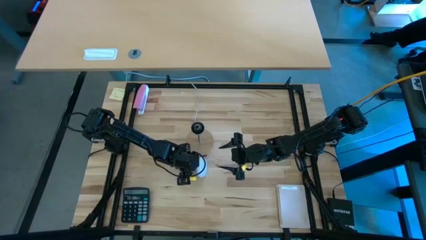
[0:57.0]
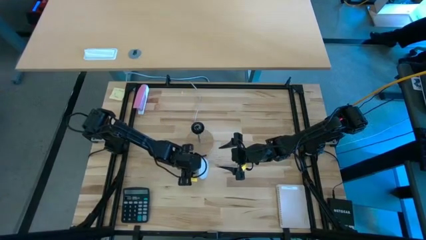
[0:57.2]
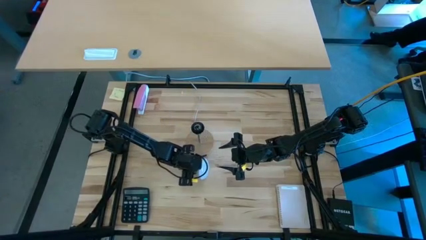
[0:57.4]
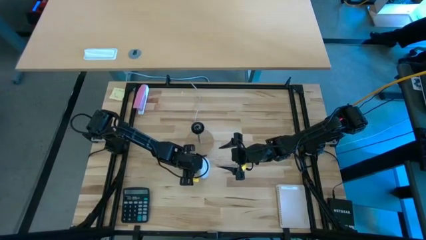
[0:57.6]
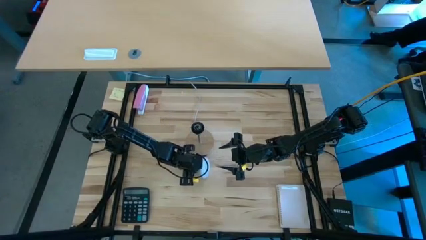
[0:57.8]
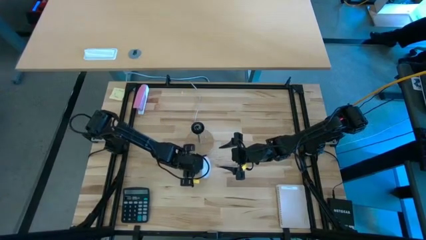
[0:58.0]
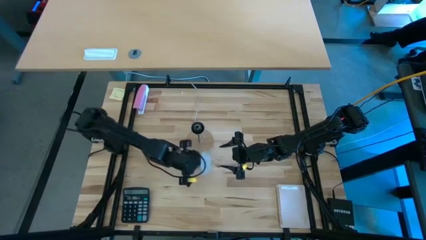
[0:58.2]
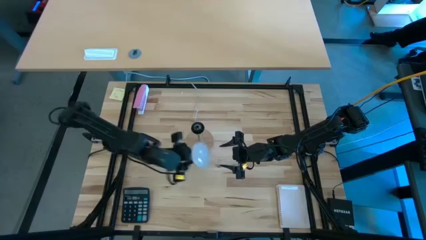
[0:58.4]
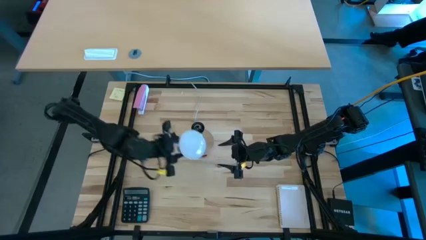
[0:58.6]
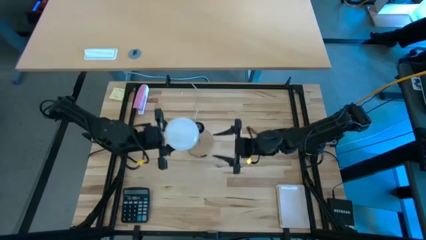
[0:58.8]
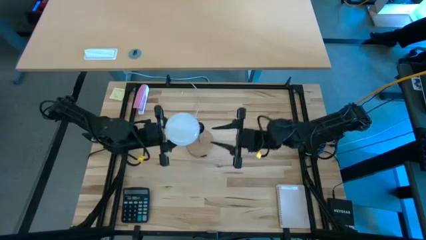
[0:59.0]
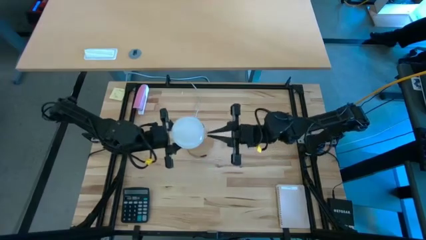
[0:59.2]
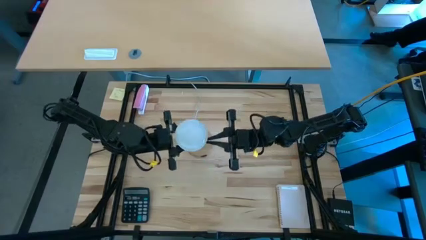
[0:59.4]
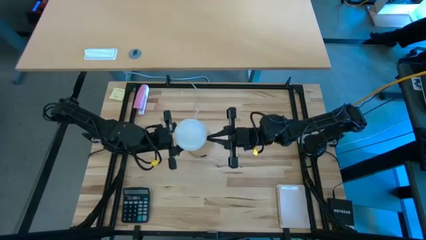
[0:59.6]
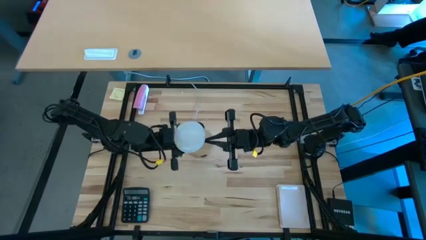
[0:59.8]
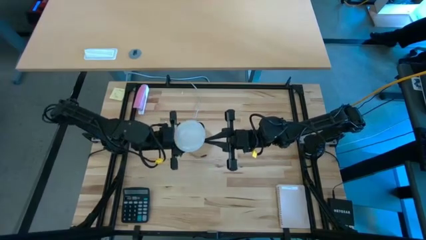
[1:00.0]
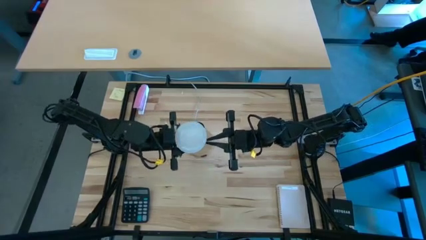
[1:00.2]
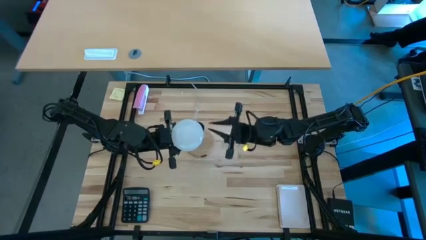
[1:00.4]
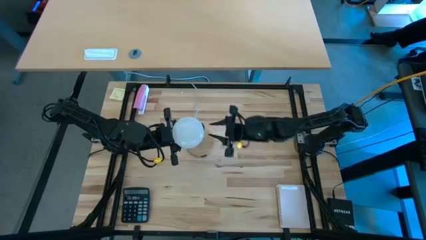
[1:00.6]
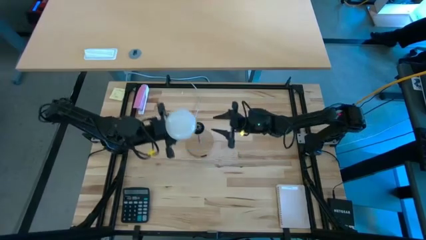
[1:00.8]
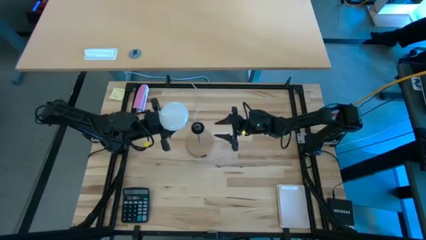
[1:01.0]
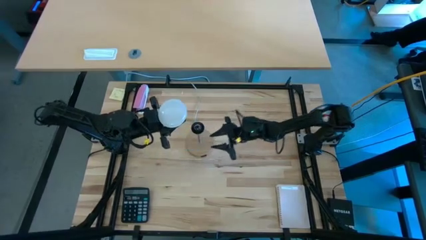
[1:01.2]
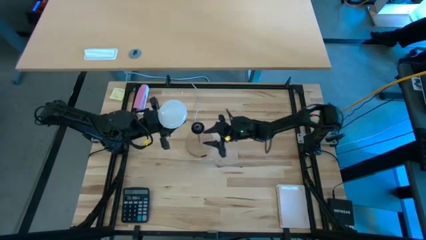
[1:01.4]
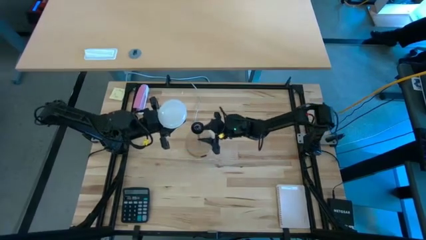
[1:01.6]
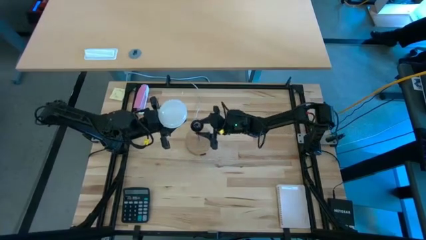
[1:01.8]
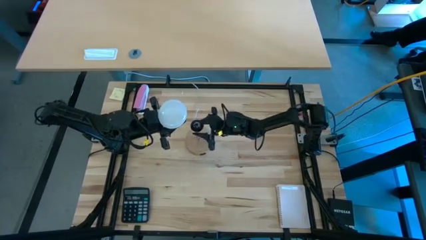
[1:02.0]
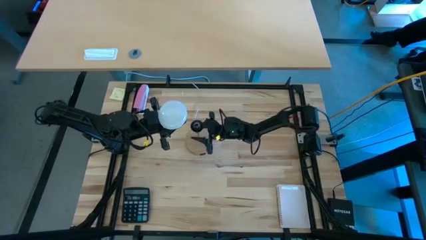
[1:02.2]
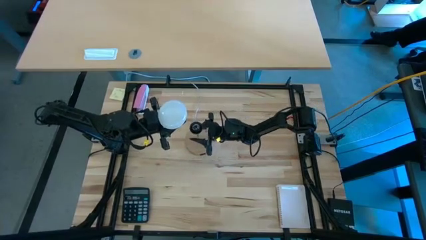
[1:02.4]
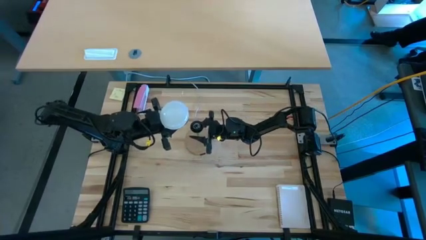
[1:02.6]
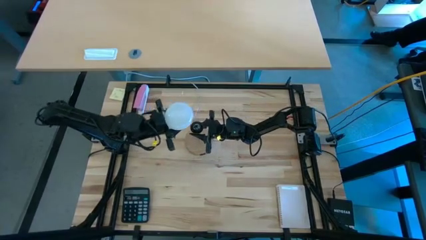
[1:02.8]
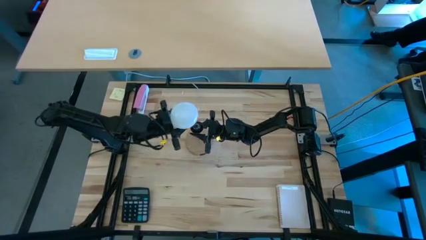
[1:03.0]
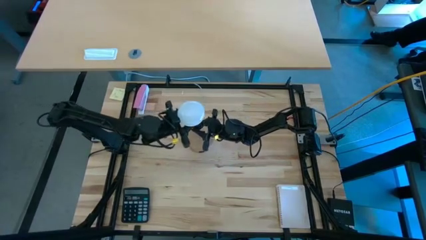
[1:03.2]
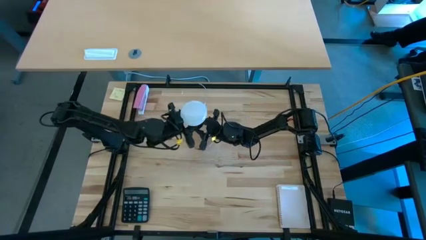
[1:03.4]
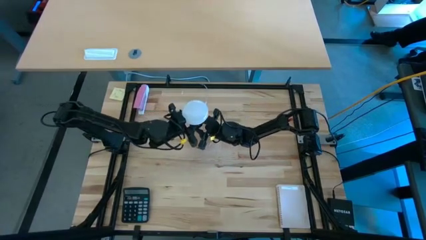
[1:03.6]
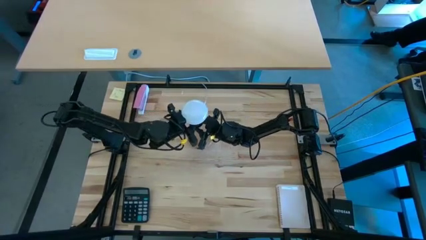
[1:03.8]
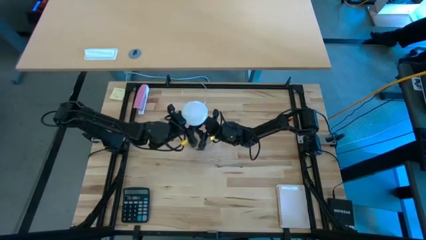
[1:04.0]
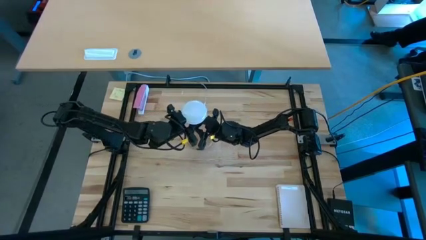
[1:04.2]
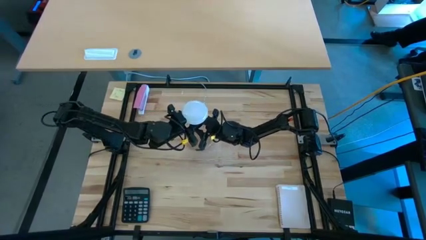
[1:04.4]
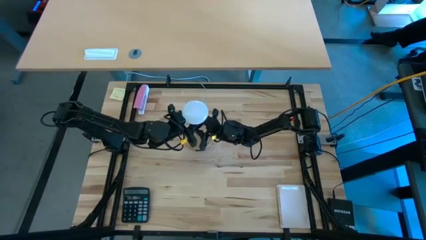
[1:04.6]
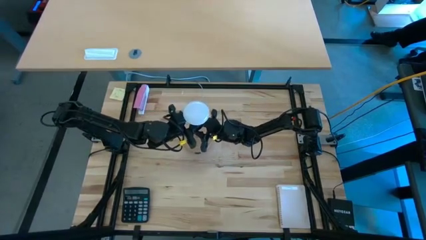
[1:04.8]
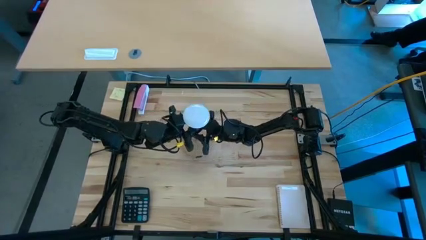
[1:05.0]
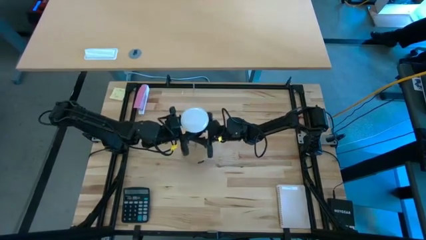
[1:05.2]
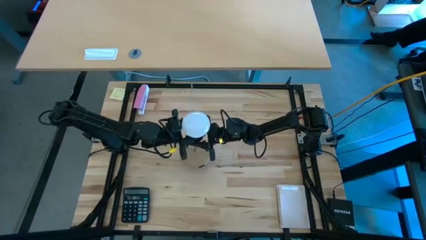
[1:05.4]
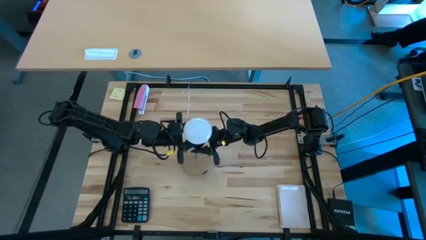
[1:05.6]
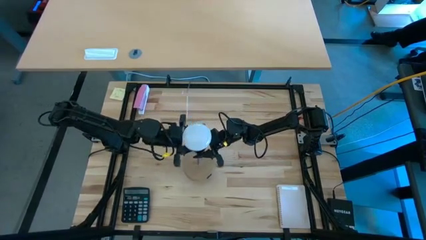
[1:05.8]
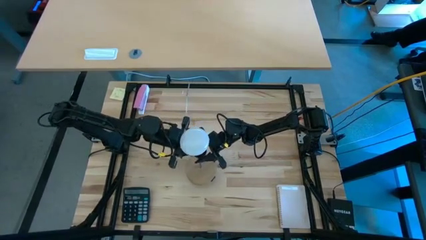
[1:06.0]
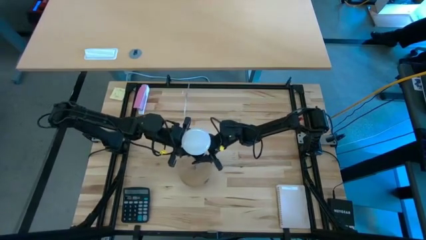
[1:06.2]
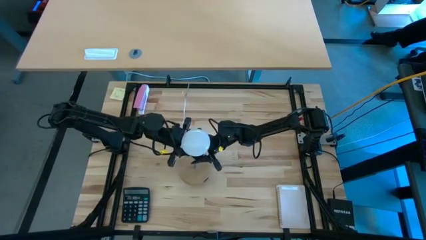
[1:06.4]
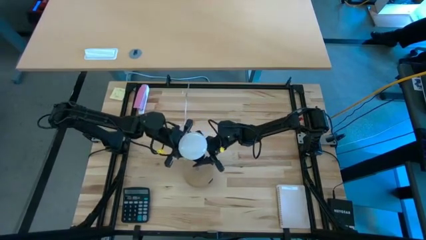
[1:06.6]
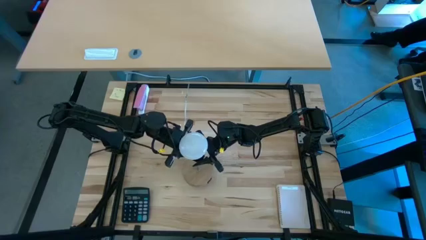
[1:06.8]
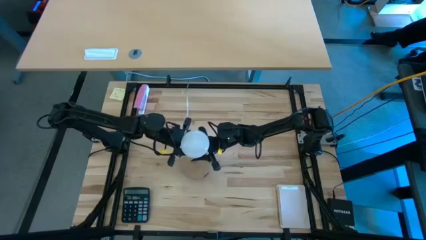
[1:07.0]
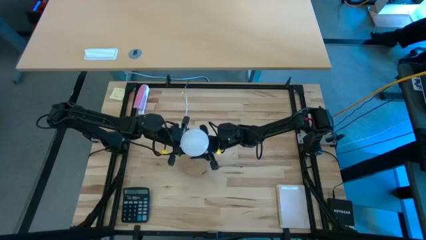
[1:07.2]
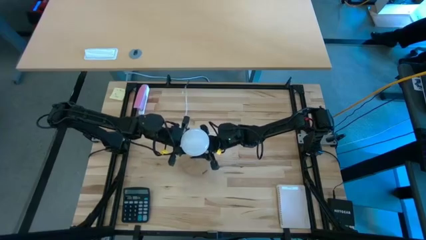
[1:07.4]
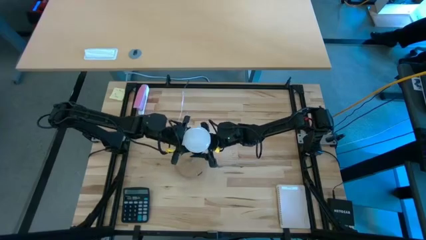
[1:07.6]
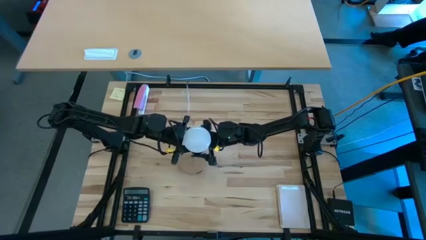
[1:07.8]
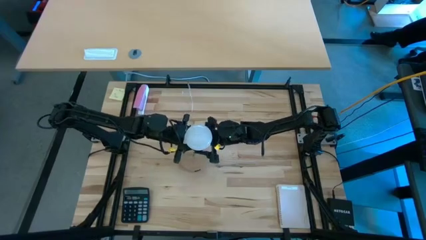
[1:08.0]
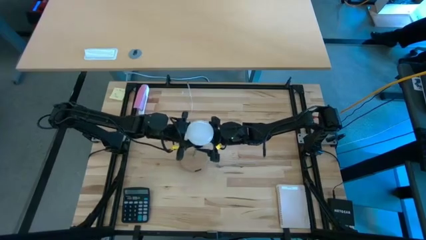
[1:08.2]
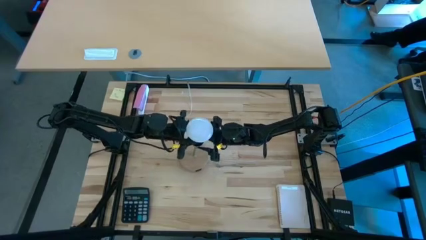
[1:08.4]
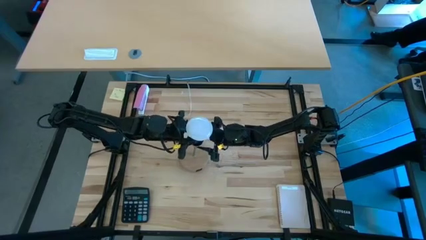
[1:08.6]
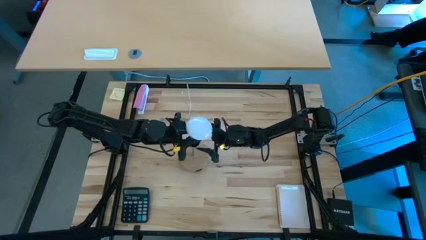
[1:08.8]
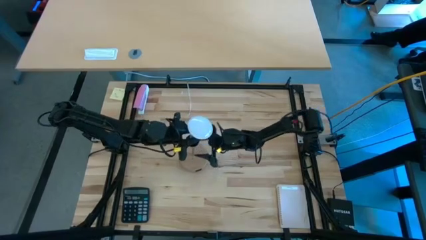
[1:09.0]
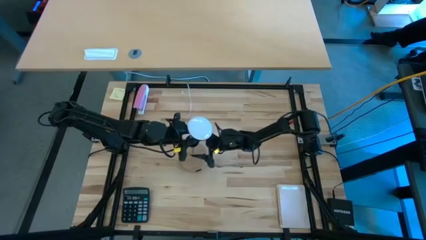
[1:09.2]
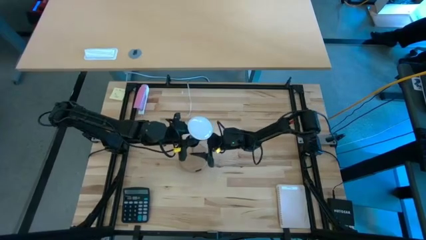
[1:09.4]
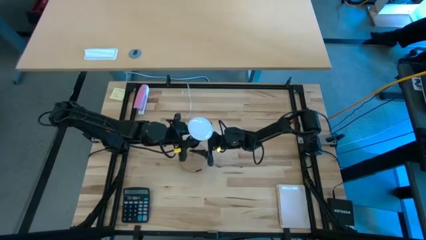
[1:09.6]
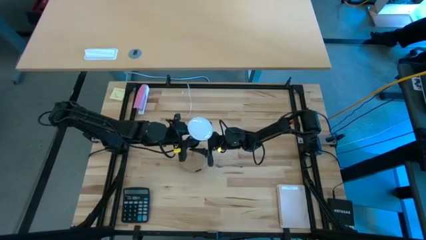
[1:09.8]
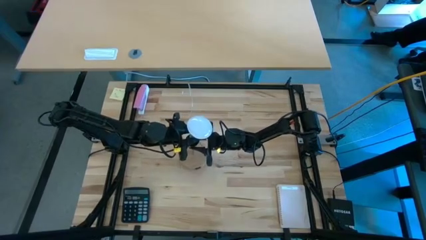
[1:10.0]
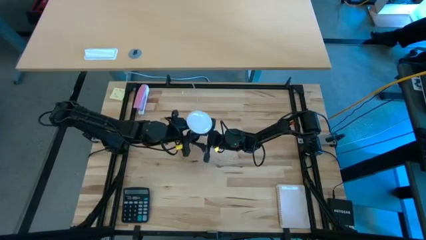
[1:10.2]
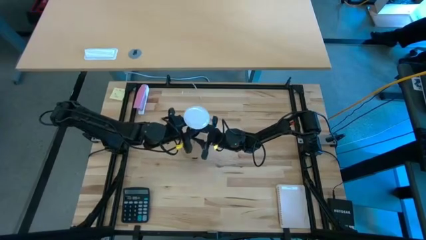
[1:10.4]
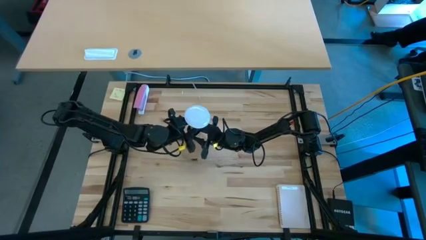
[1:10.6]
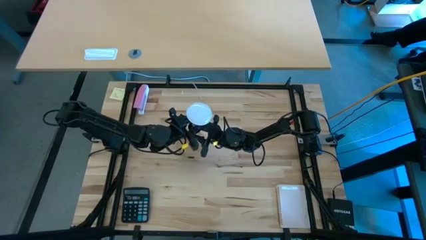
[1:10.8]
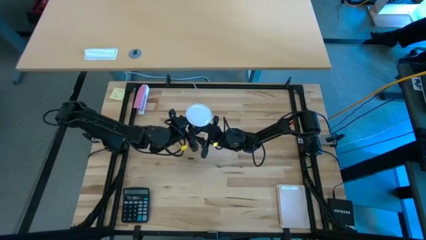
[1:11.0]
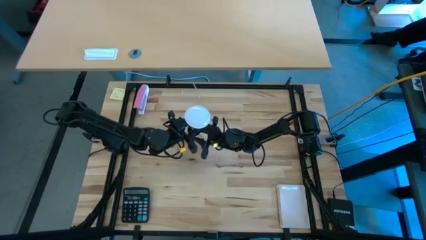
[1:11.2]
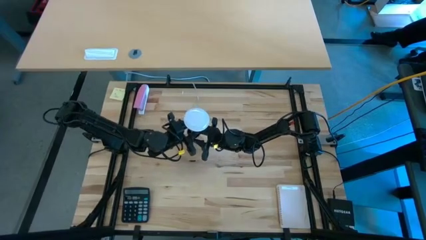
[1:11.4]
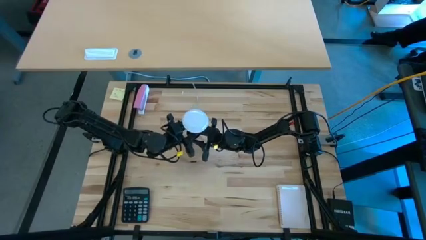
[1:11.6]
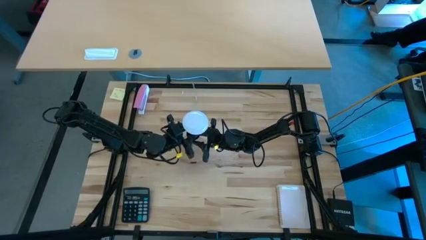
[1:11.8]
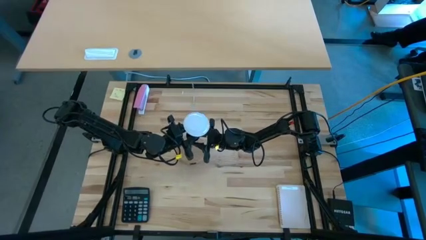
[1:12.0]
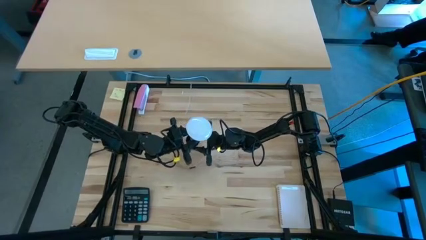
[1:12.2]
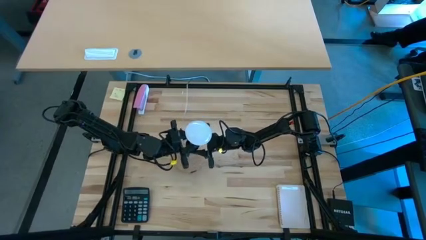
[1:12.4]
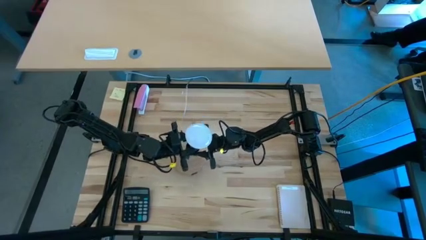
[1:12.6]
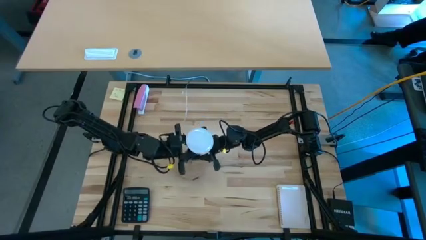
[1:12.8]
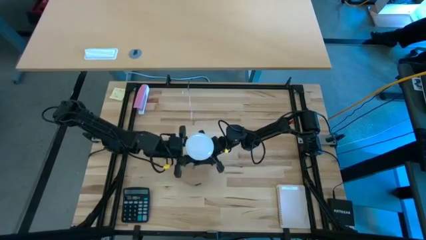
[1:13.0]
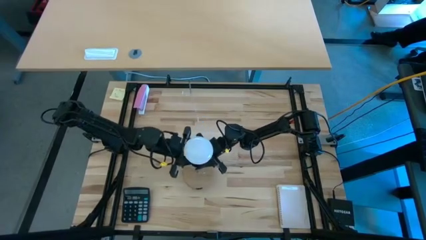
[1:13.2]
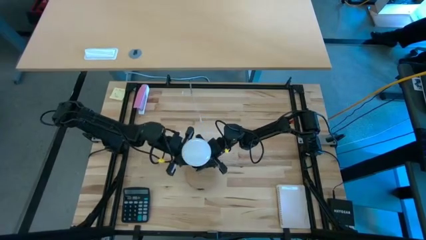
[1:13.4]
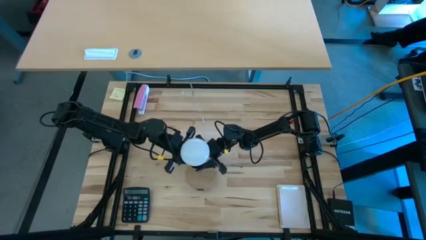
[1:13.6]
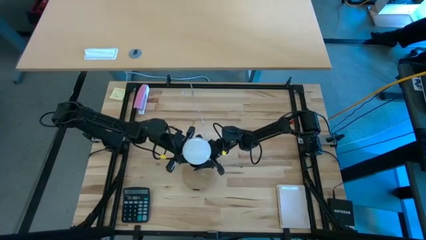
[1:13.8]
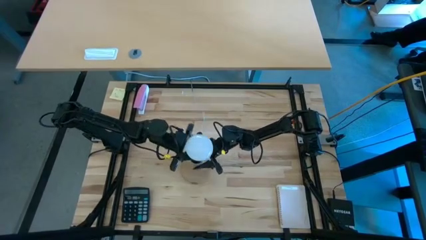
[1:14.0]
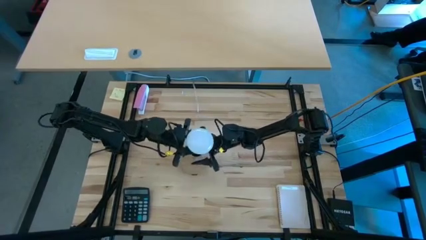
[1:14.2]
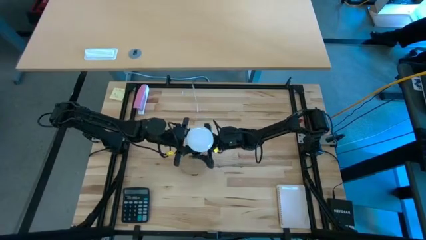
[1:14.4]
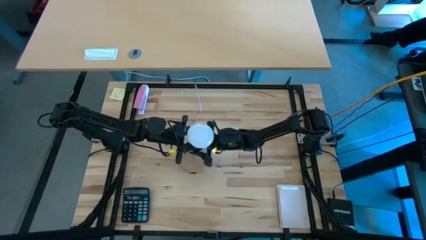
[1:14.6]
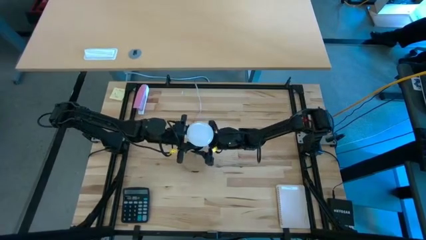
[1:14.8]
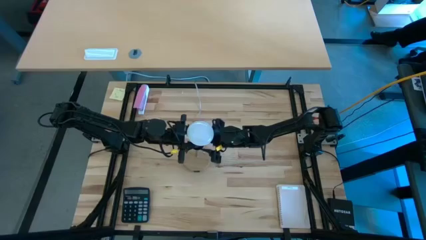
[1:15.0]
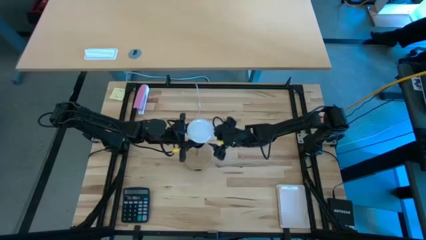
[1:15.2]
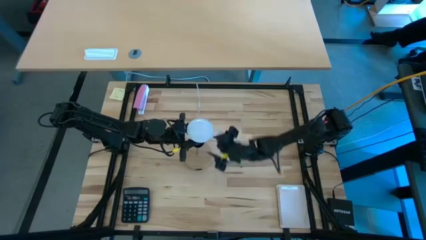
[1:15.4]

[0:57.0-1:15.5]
Task: Screw lightbulb
Insert the lightbulb into the desk lamp
